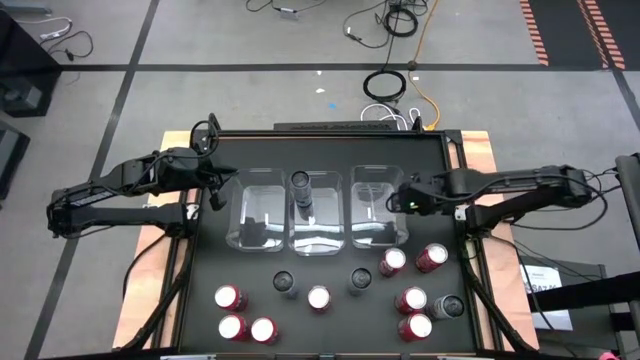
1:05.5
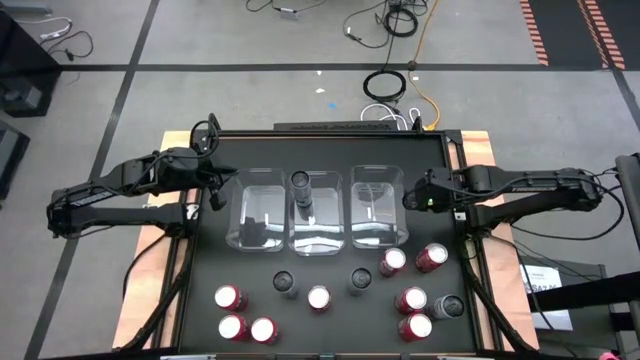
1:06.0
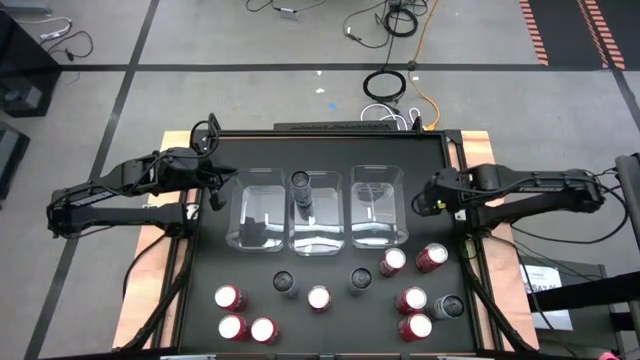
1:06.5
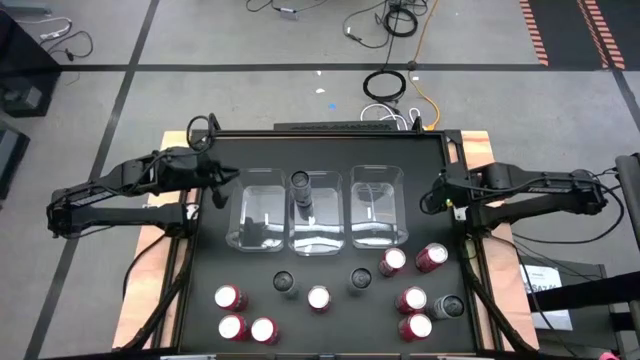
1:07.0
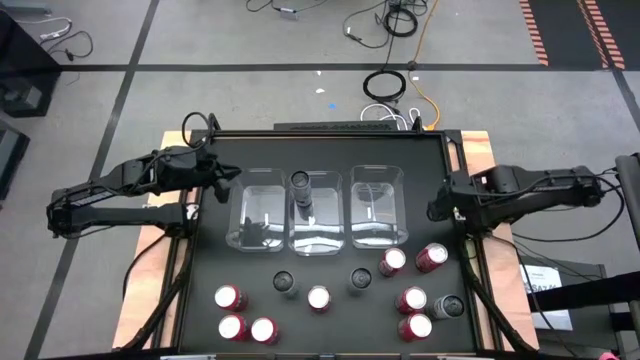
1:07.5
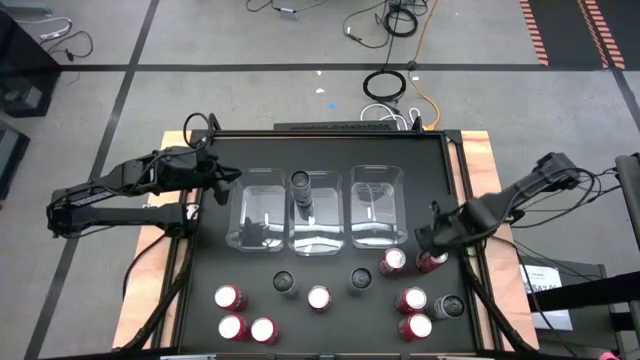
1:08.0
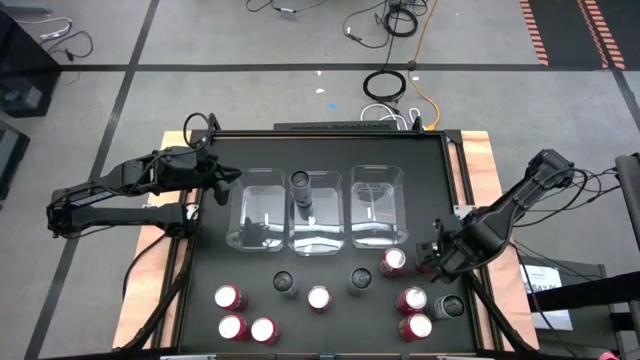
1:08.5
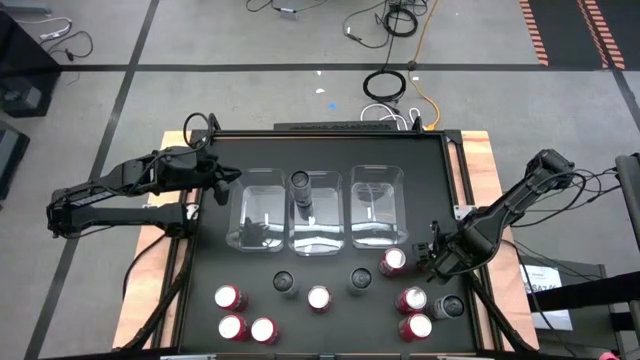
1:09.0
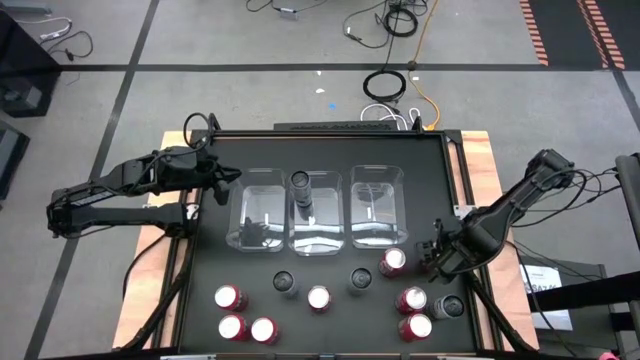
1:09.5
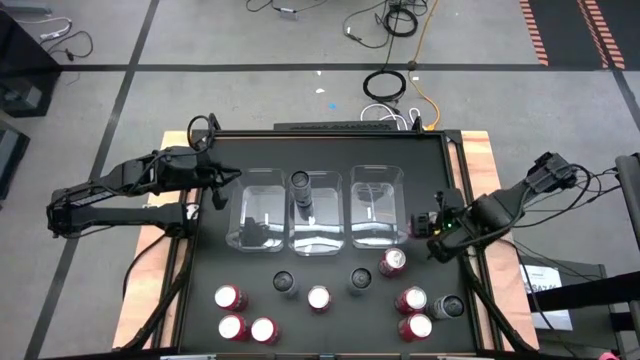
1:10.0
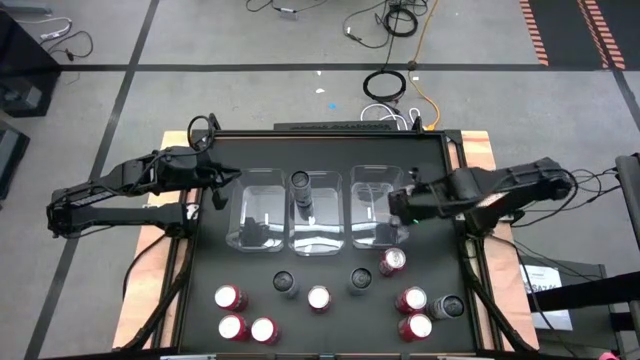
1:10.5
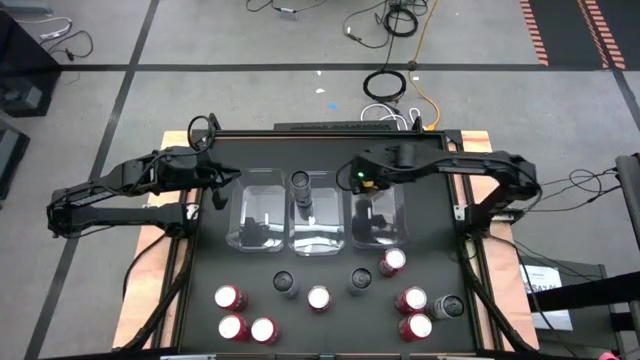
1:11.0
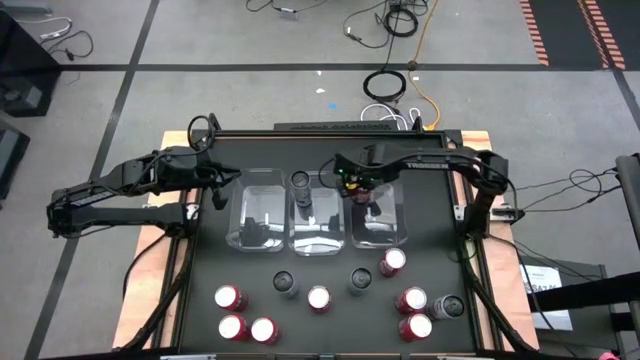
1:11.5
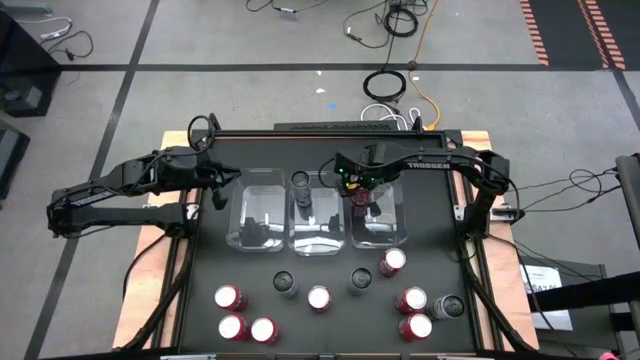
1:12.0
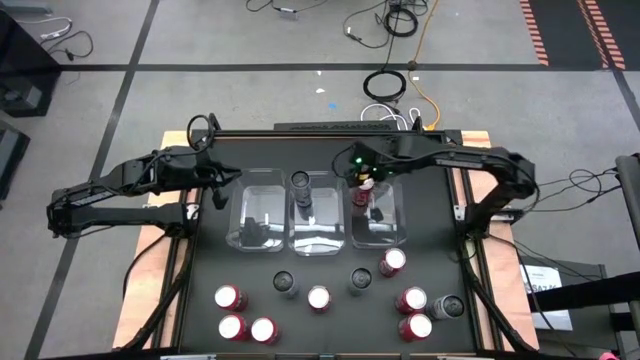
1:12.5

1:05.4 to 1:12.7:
Task: Sort soda cans
Put the top right red soda can into the right transparent bin

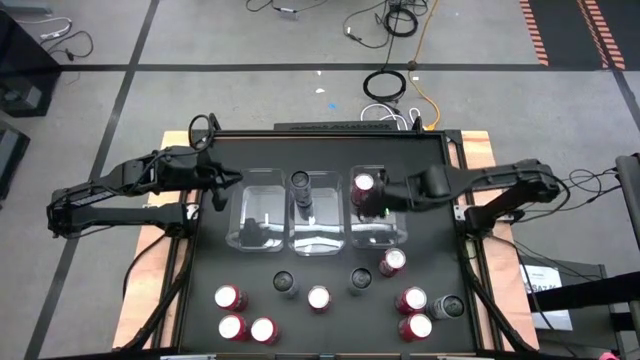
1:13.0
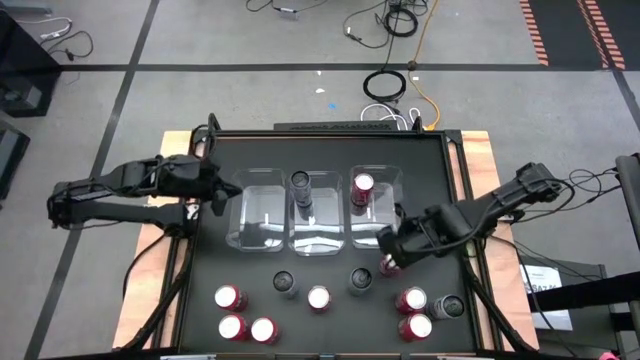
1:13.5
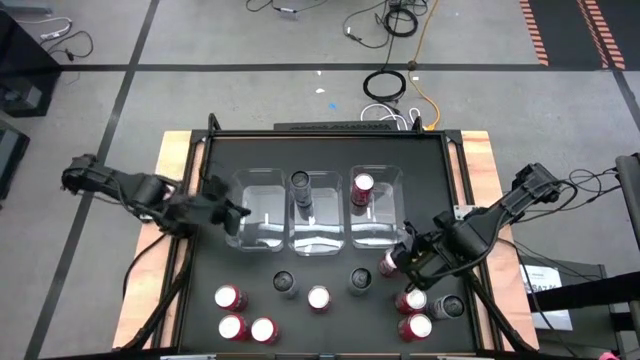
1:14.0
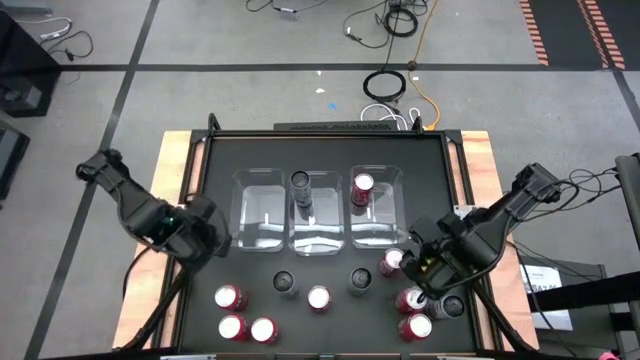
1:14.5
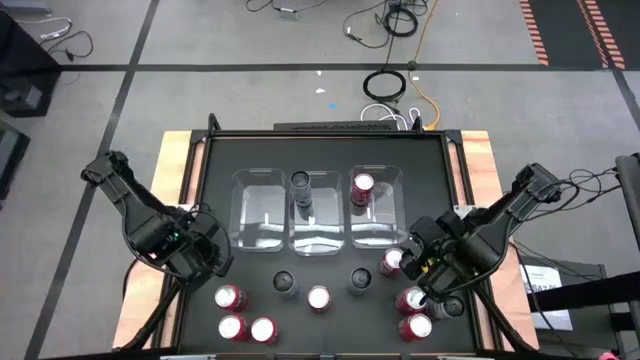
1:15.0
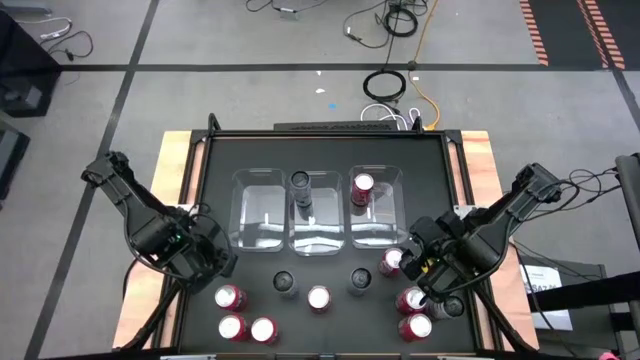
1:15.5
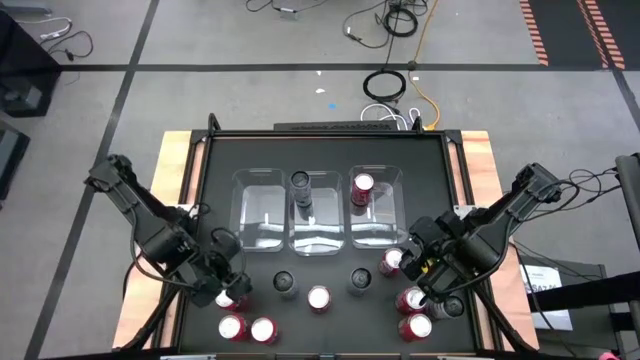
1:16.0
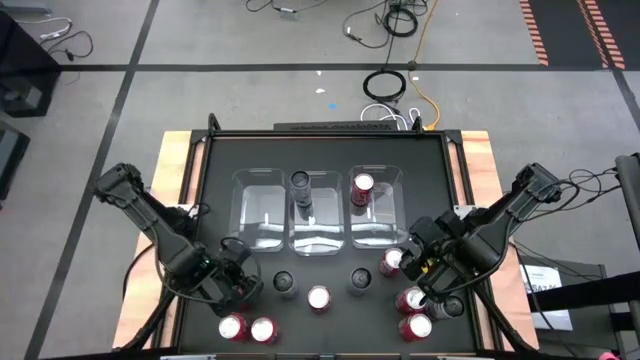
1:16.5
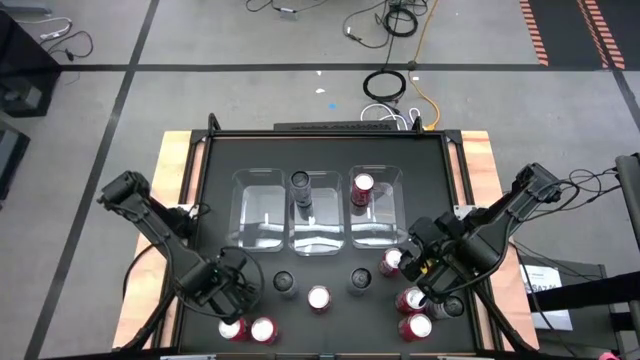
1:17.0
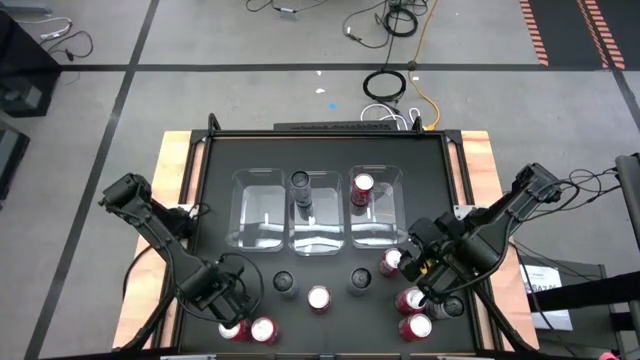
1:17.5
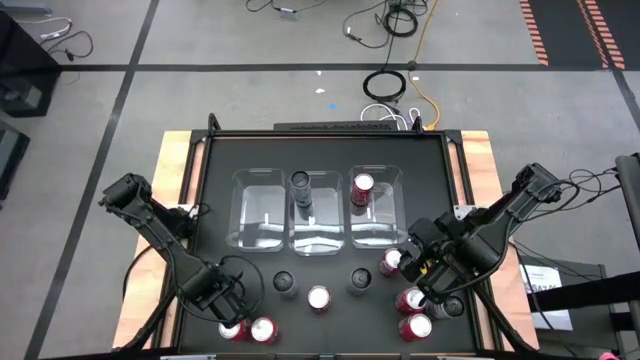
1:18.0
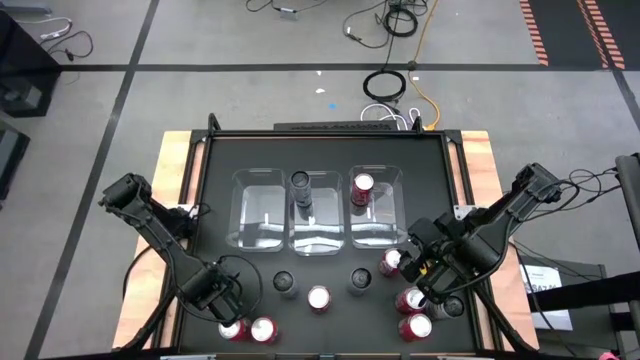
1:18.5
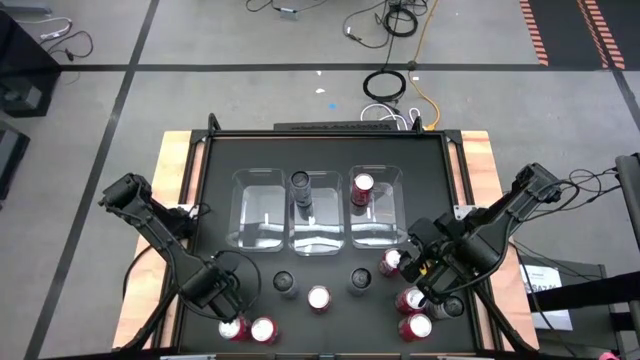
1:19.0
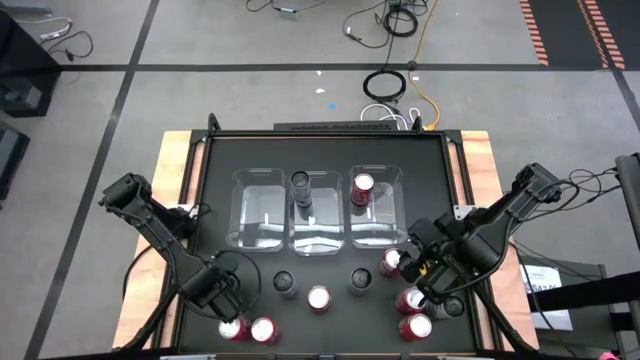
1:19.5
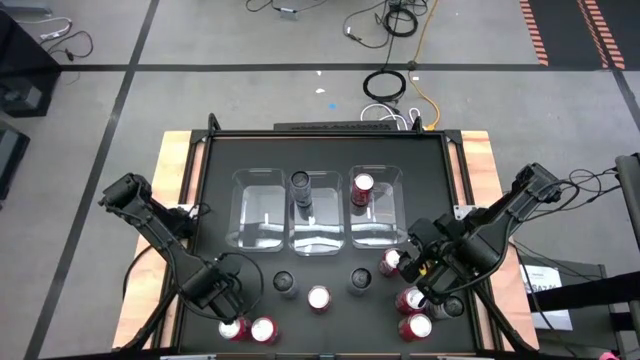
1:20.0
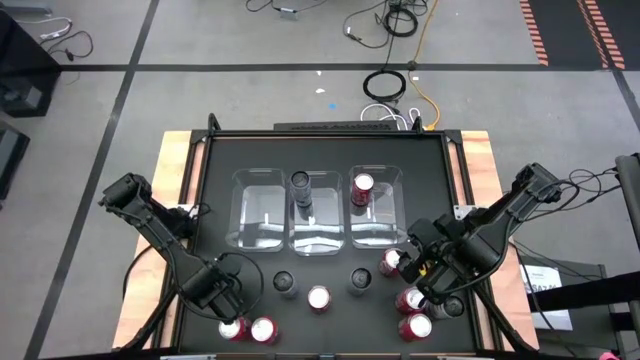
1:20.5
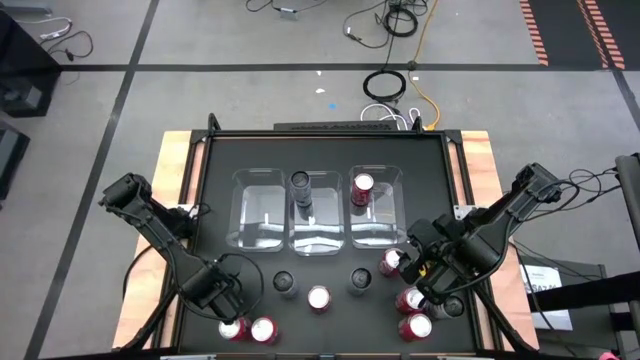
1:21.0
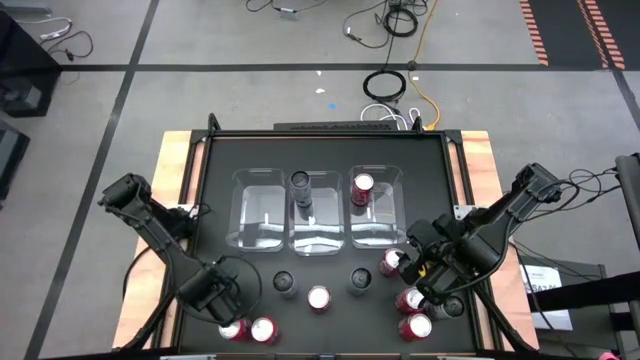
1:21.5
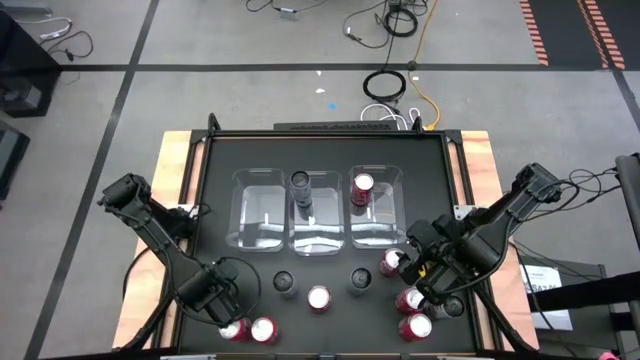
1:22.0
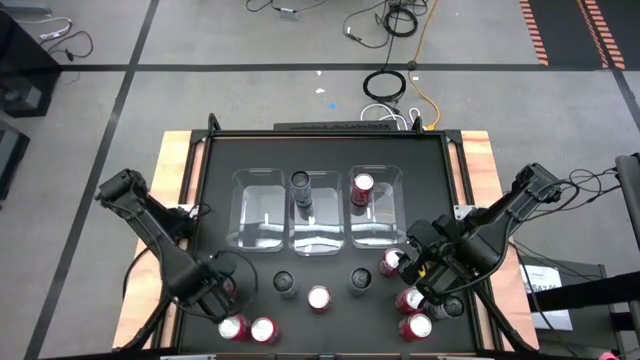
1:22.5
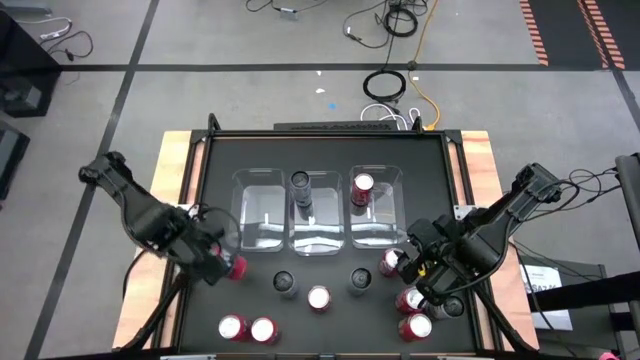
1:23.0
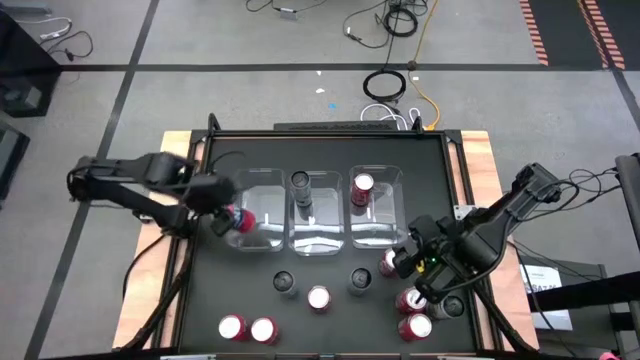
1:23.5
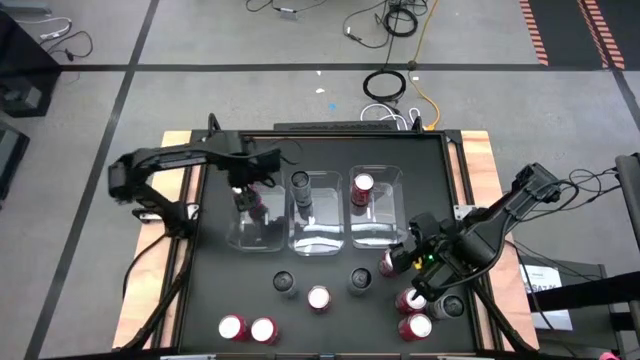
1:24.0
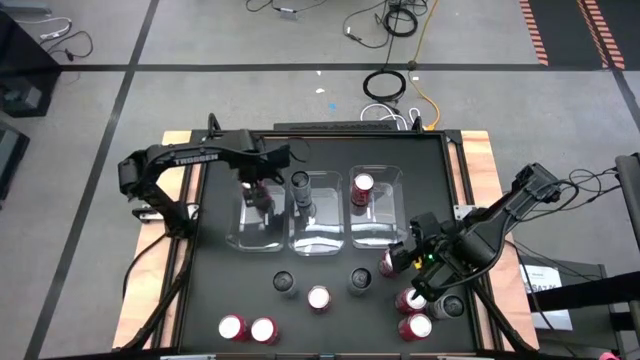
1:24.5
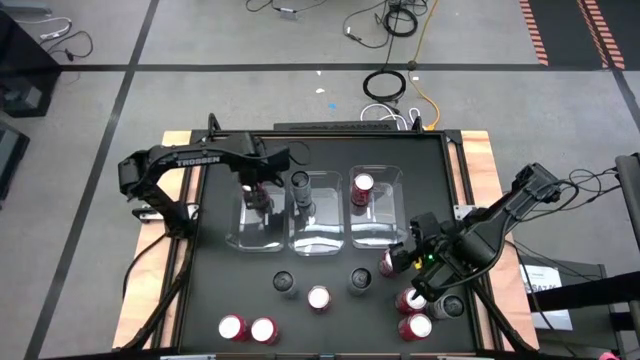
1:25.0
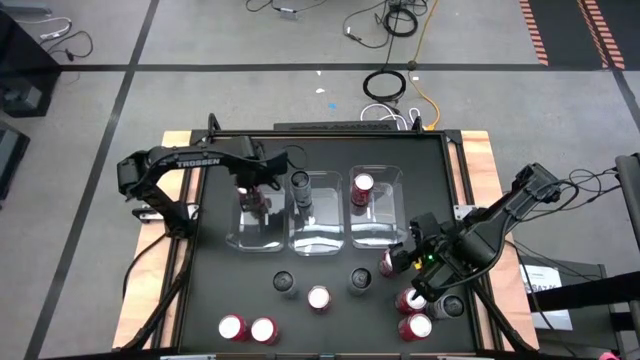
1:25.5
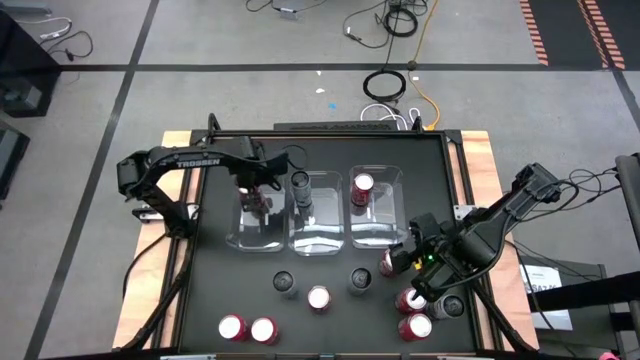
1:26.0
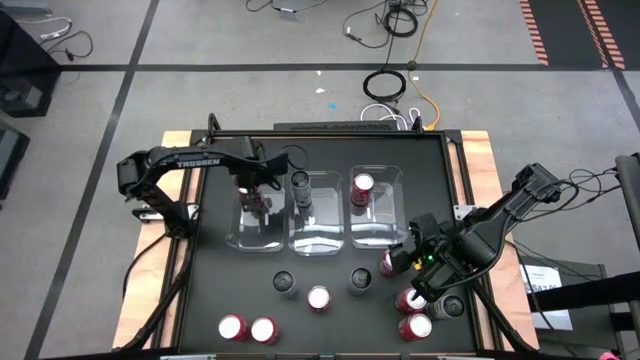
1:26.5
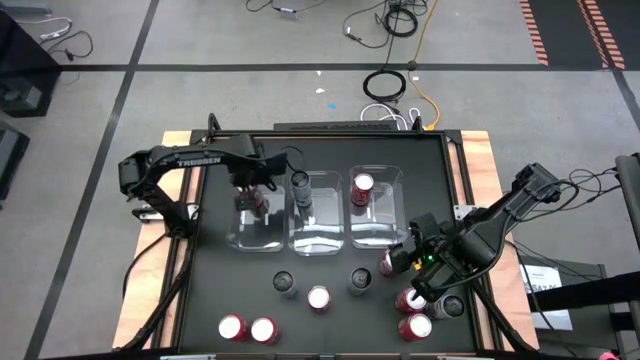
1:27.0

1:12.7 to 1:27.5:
Put the top left orange soda can into the left transparent bin
